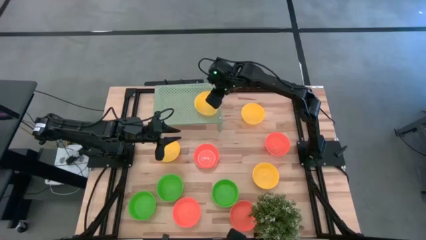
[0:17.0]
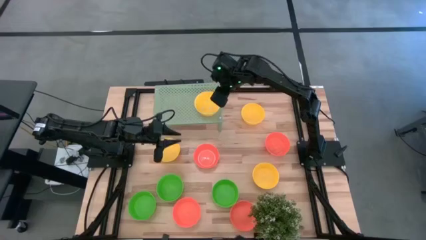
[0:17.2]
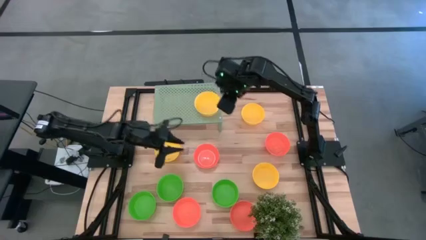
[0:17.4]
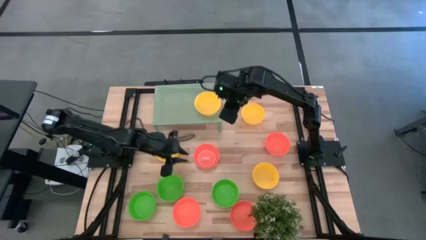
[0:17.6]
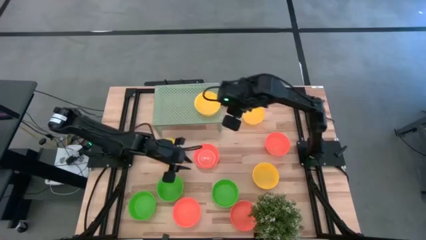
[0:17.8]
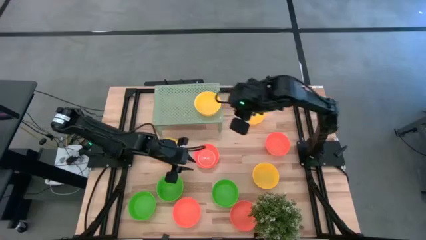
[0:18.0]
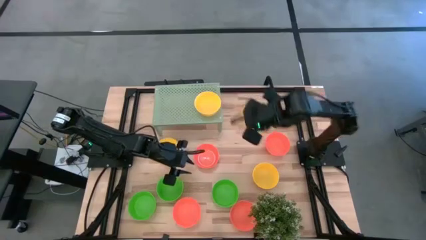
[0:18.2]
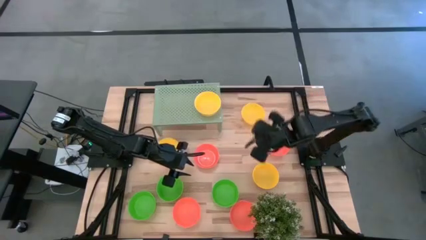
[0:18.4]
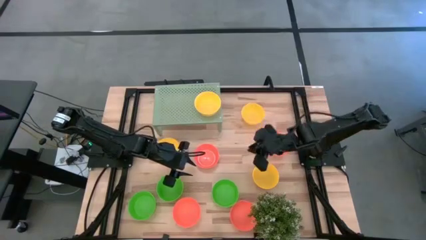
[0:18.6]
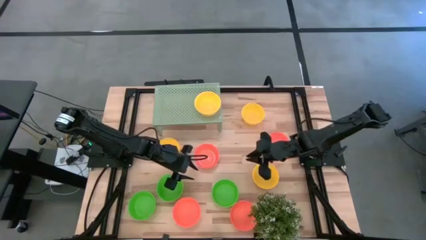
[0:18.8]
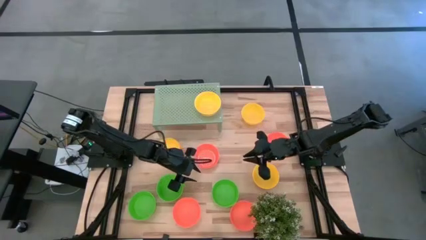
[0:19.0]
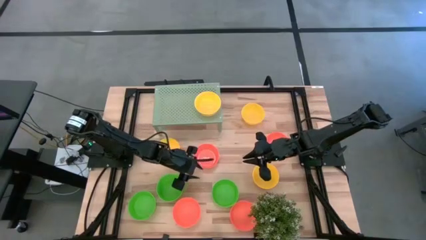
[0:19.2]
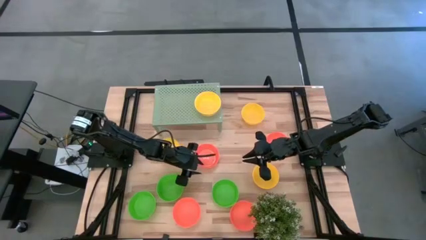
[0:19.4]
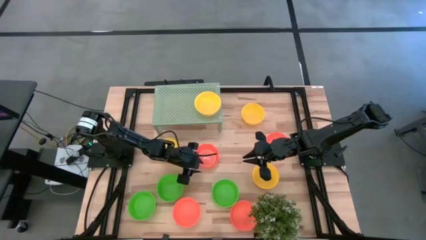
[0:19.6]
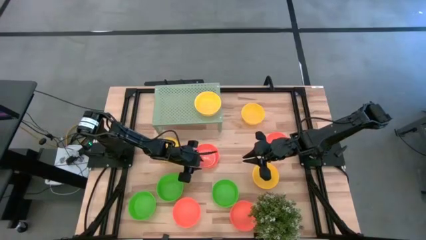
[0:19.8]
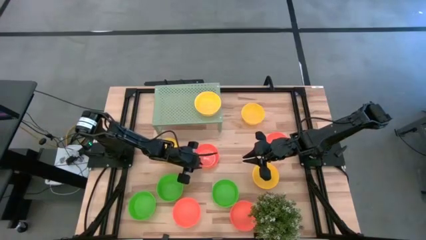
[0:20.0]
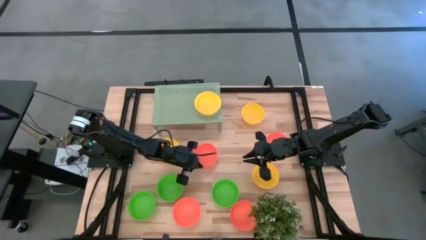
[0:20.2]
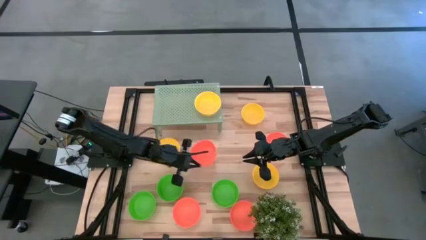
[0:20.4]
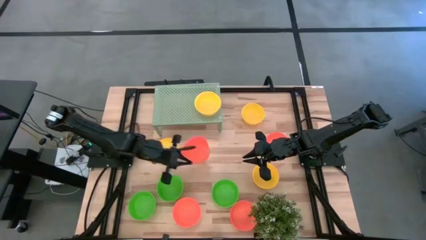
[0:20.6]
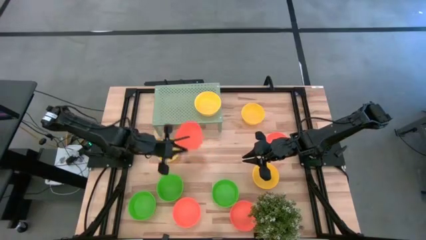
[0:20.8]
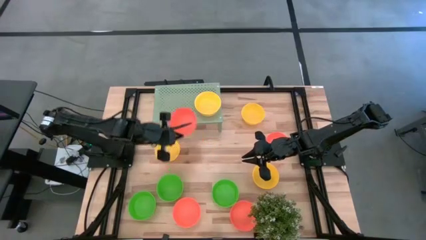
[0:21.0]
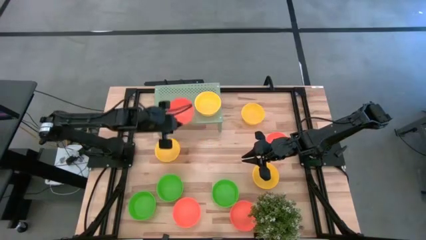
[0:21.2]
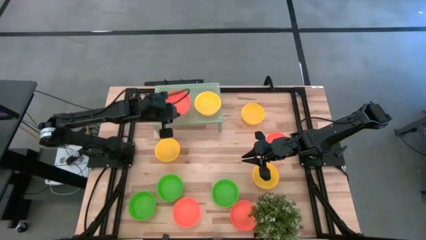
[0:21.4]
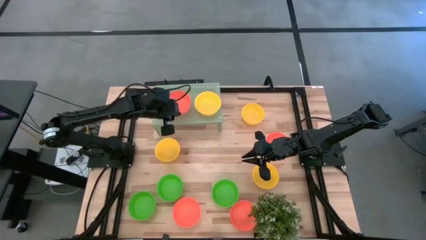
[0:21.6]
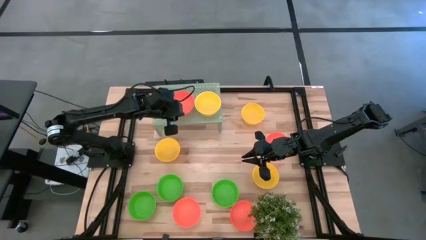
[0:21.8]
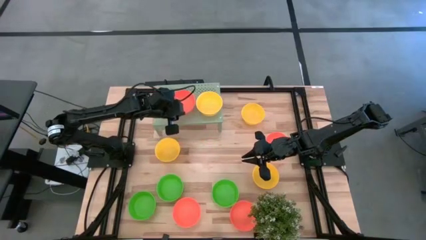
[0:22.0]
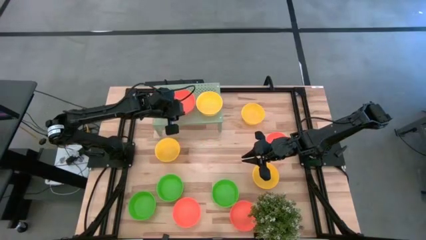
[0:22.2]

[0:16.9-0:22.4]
Task: Pick & Place Mini bowls
Put the orange bowl on the shelf

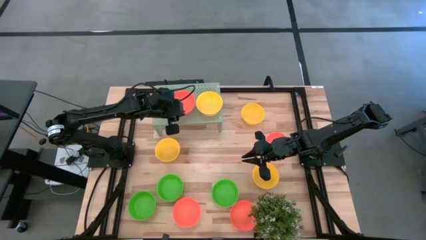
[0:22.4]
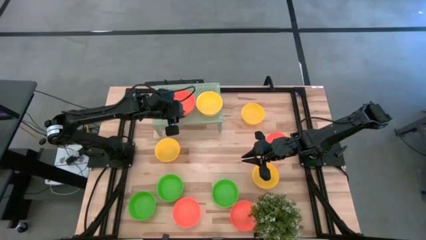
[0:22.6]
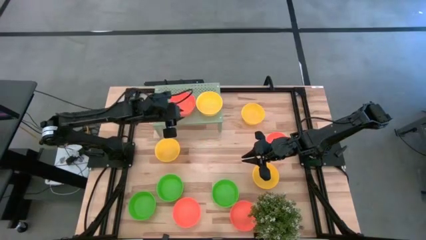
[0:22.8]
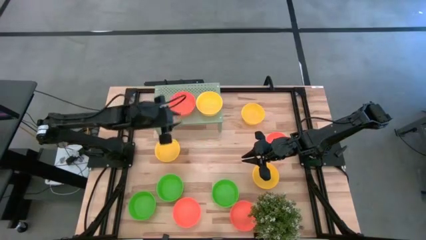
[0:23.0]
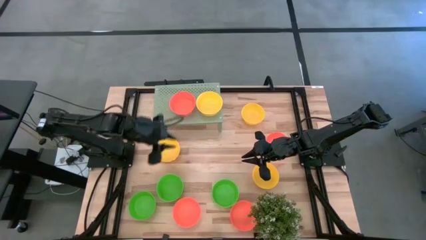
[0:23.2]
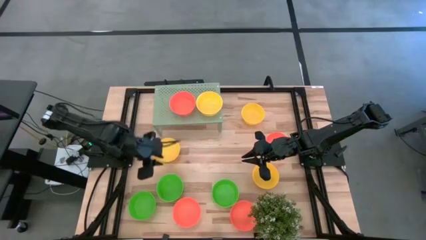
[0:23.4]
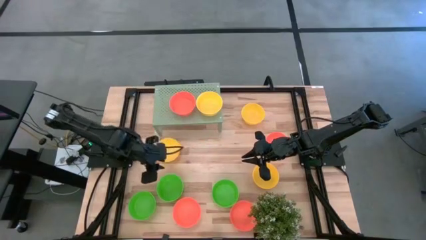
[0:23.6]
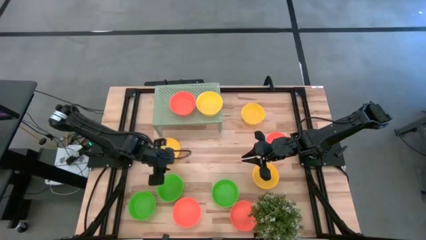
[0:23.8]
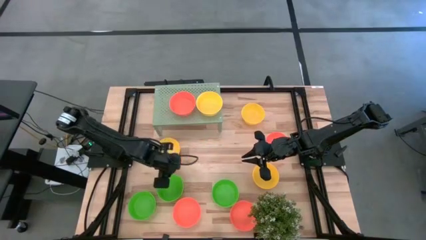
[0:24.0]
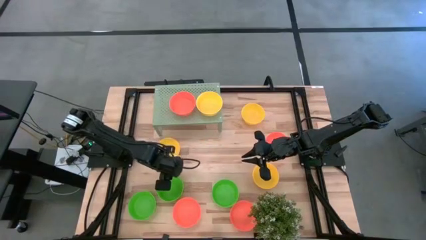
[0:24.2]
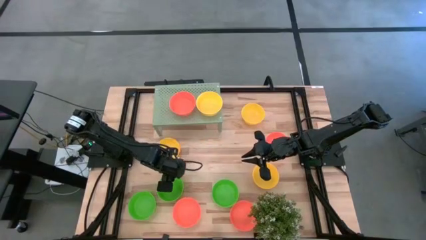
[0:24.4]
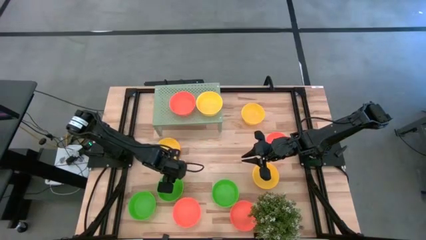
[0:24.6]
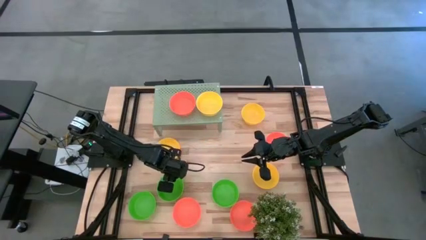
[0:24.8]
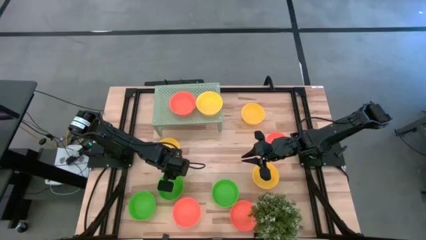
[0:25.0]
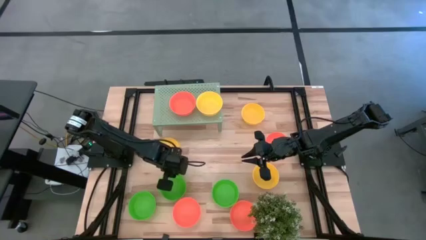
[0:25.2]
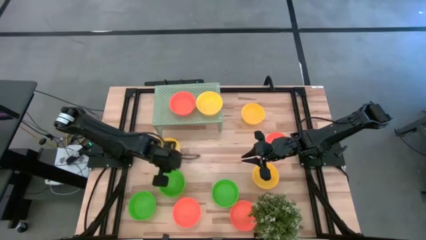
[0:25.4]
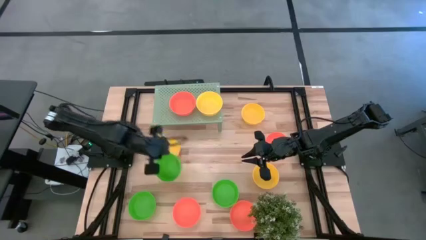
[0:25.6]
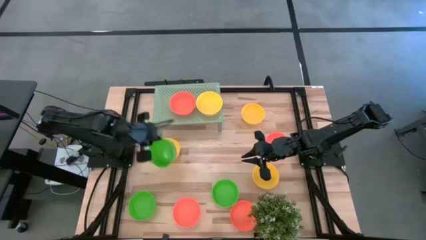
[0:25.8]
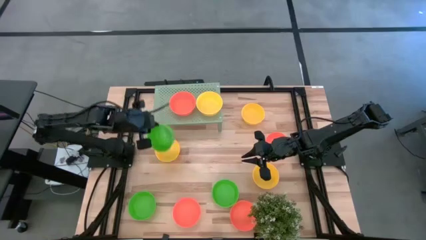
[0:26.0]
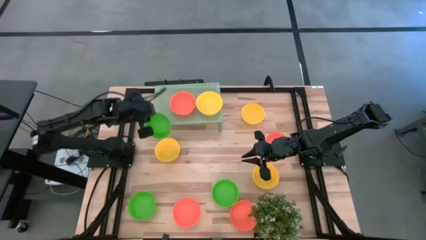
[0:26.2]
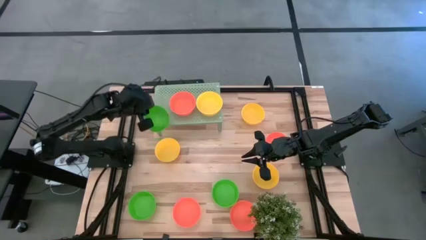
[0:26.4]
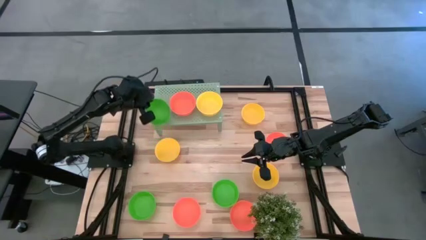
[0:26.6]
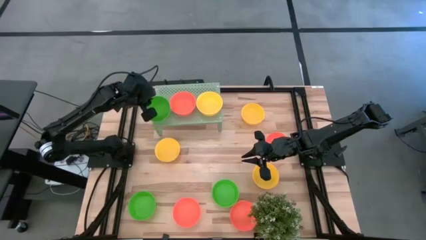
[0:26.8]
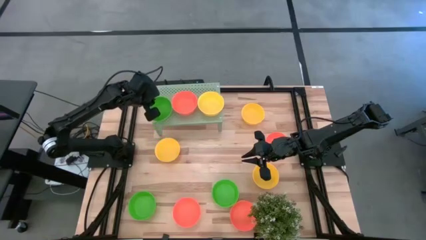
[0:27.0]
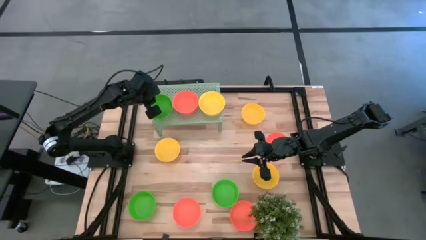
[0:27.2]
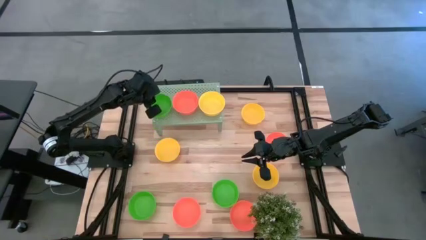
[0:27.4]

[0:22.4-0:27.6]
Put the green bowl on the shelf

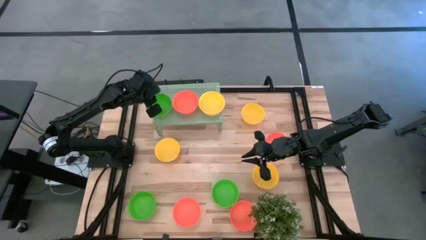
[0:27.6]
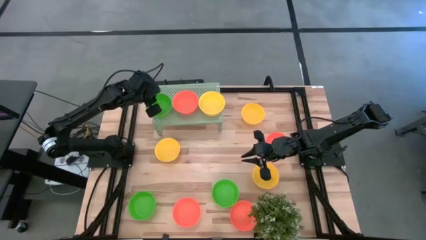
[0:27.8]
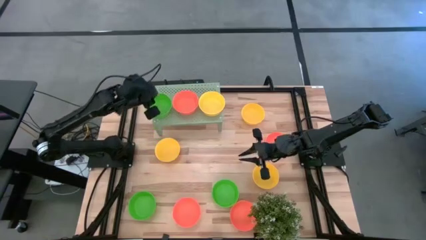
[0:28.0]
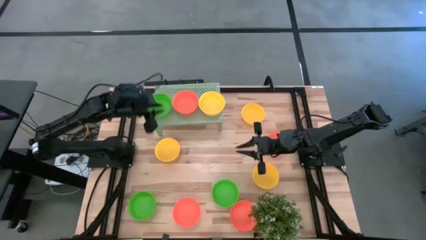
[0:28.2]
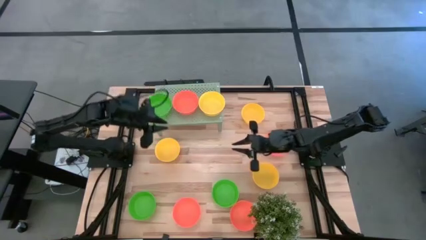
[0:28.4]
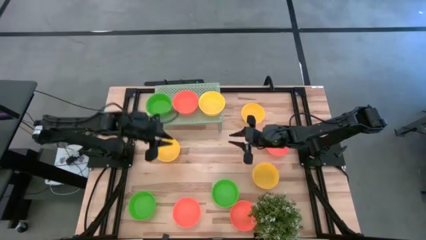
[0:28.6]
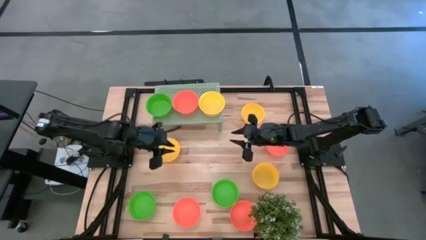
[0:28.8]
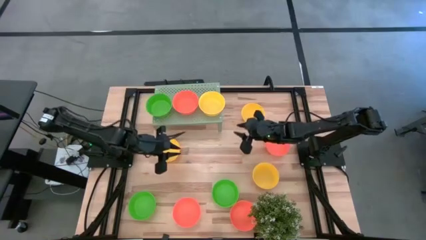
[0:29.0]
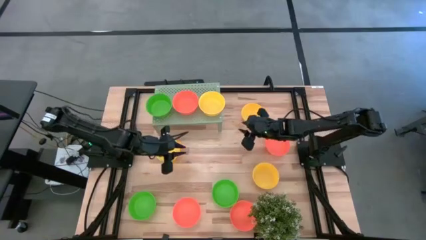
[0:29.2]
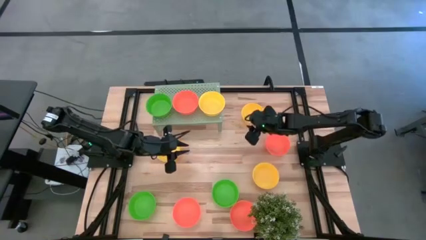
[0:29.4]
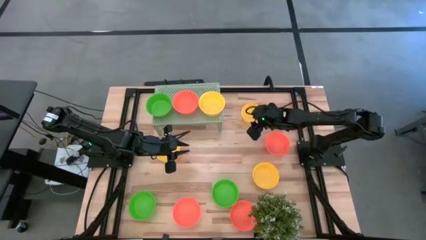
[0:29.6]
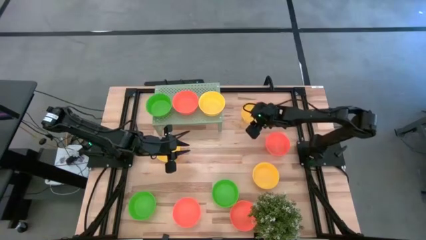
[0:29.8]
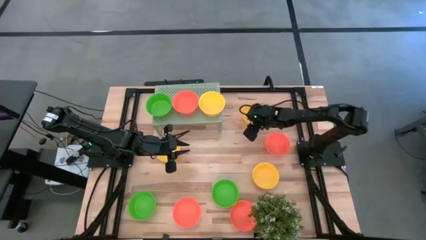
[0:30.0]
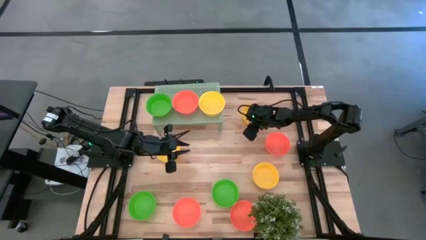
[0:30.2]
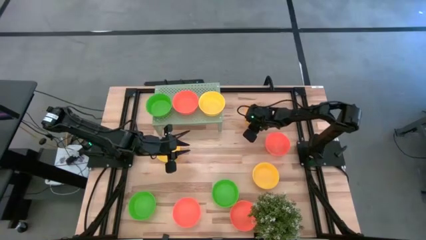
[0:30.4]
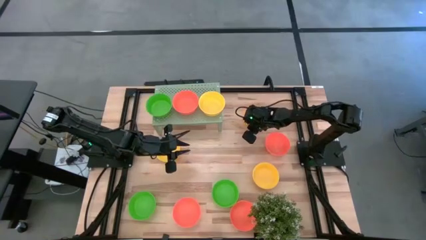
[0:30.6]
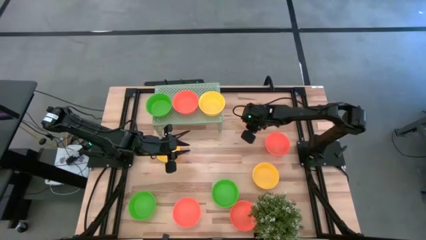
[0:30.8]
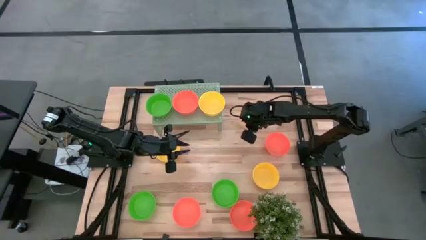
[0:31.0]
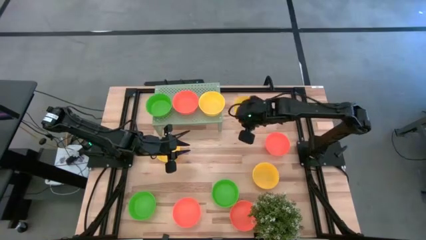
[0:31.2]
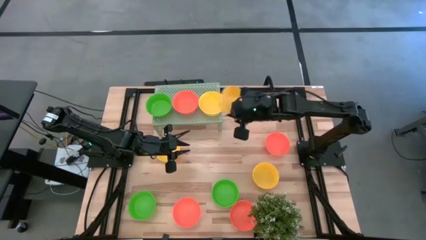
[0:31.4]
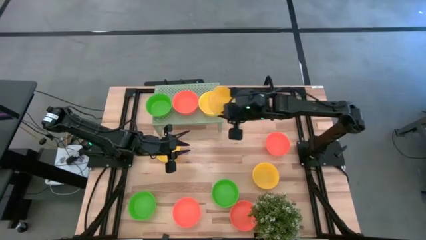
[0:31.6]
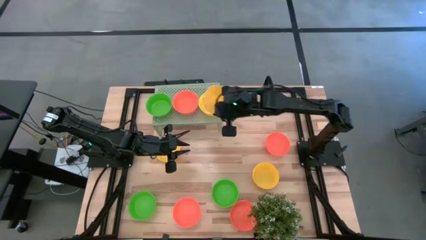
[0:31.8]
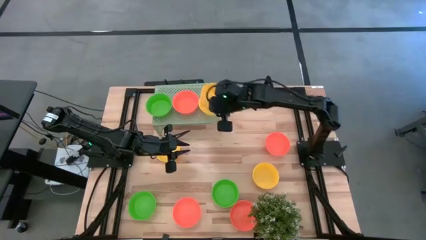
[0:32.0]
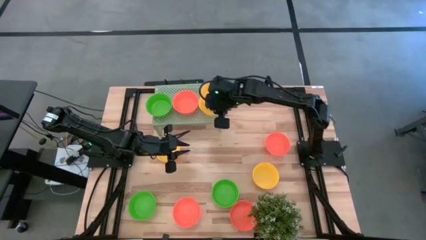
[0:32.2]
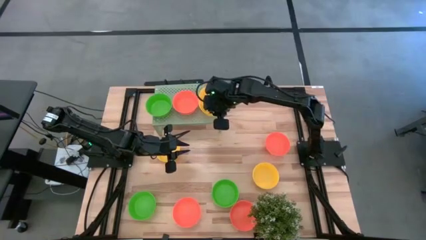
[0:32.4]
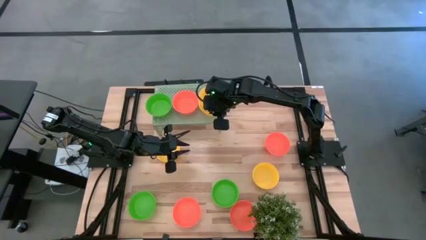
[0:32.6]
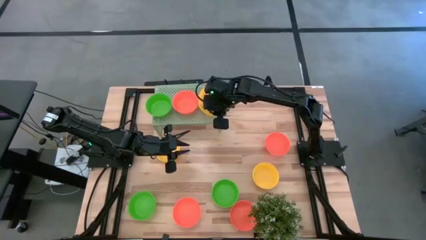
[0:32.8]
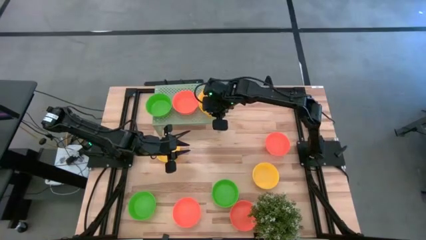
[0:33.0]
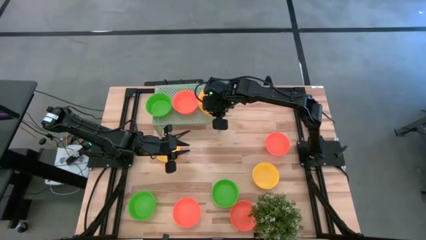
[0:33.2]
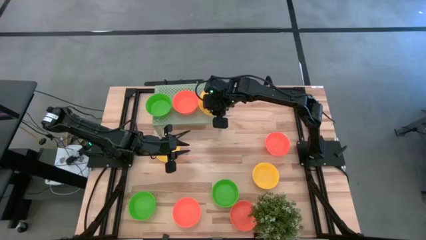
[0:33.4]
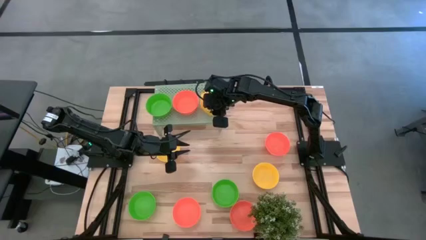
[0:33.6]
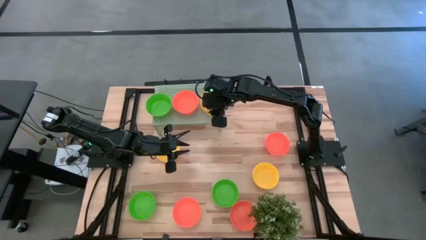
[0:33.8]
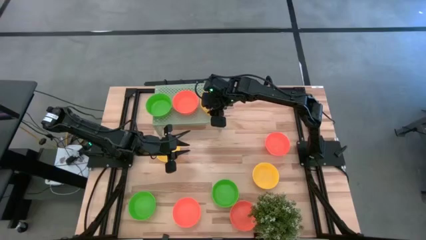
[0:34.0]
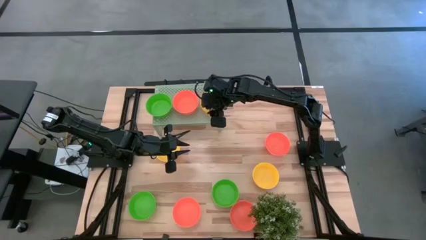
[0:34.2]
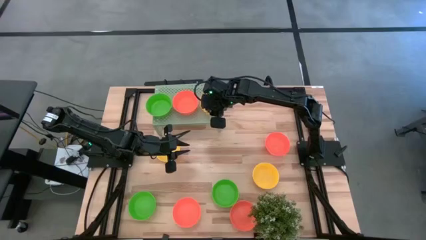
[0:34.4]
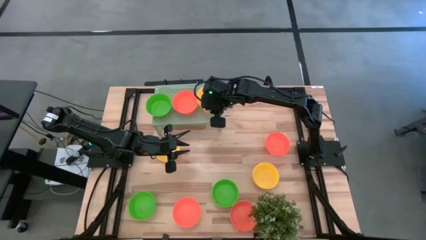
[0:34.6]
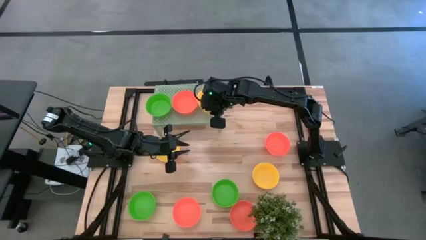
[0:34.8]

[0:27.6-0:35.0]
Stack the yellow bowl on the yellow bowl on the shelf
